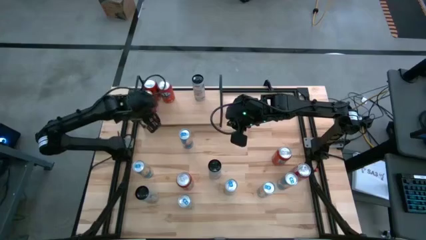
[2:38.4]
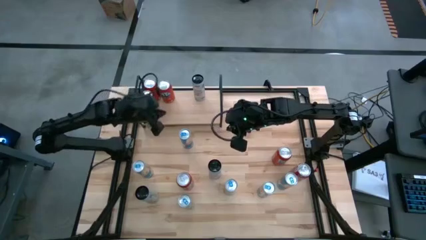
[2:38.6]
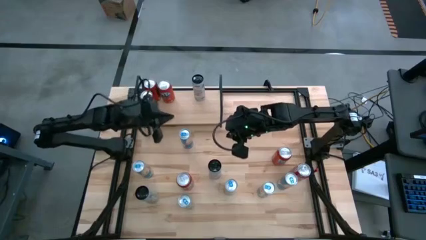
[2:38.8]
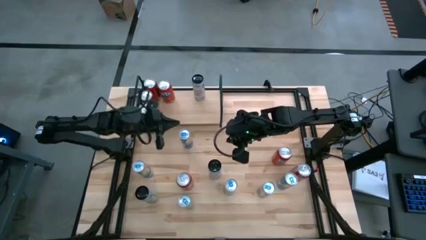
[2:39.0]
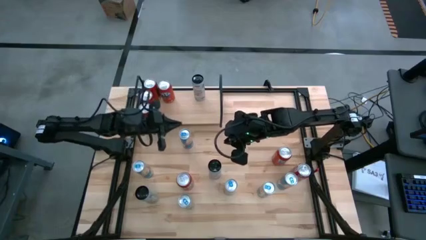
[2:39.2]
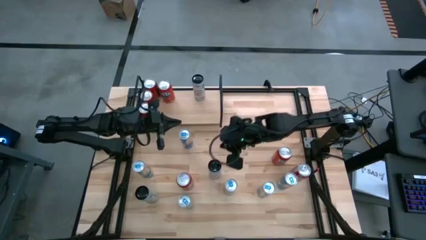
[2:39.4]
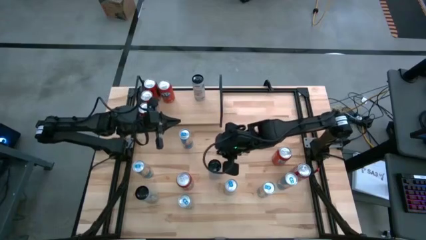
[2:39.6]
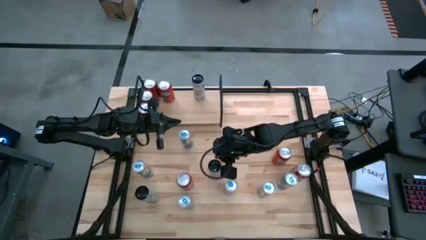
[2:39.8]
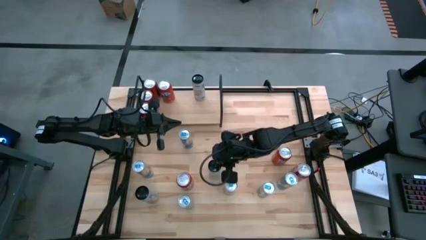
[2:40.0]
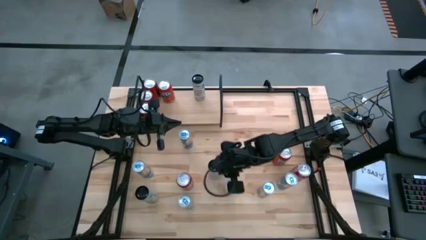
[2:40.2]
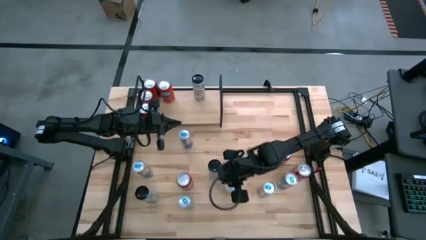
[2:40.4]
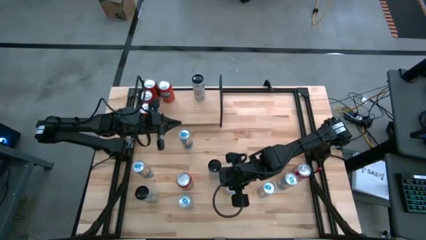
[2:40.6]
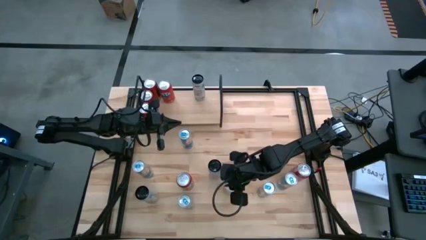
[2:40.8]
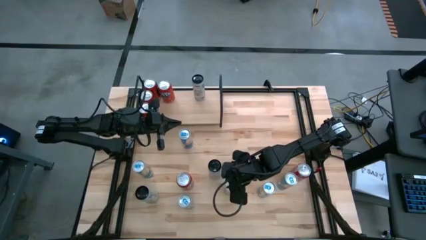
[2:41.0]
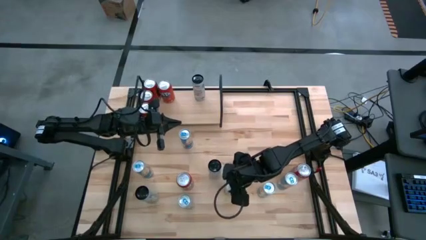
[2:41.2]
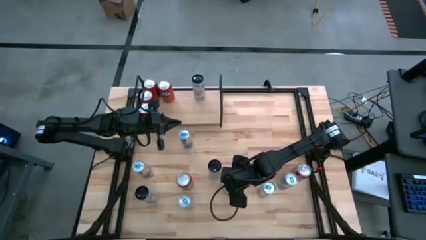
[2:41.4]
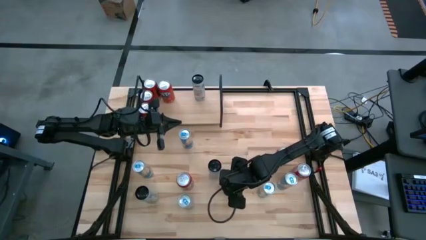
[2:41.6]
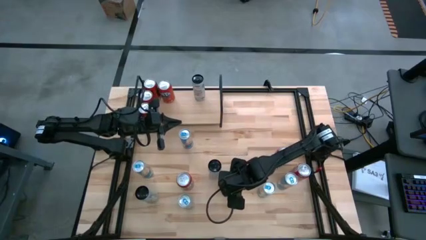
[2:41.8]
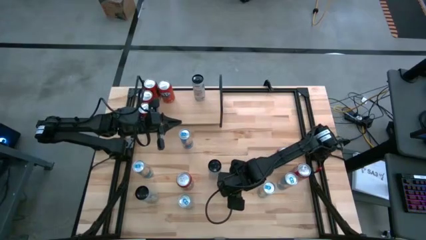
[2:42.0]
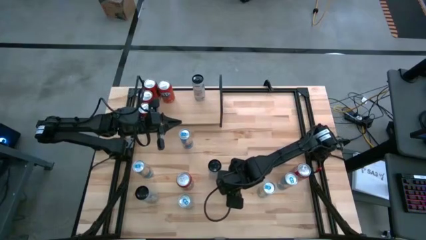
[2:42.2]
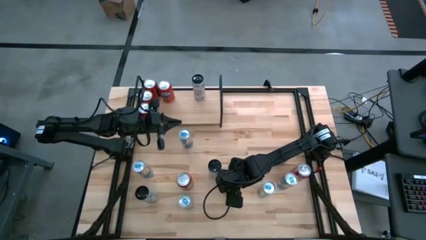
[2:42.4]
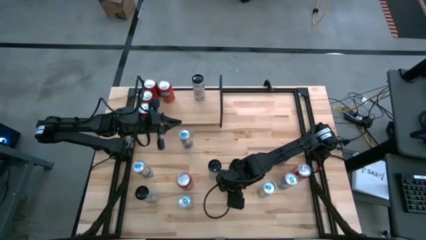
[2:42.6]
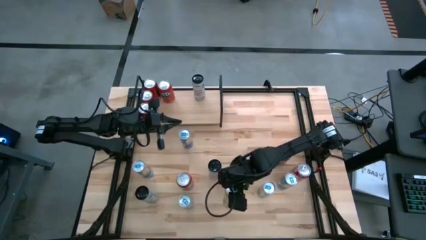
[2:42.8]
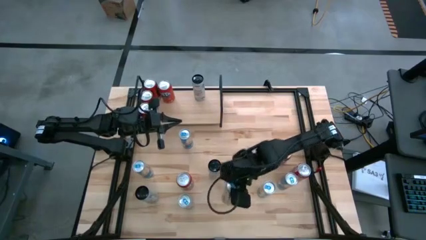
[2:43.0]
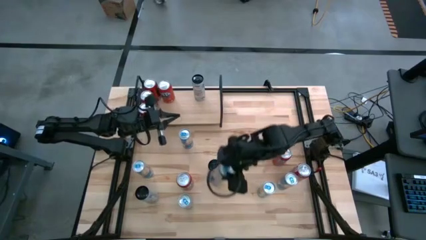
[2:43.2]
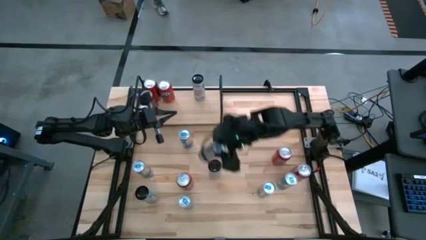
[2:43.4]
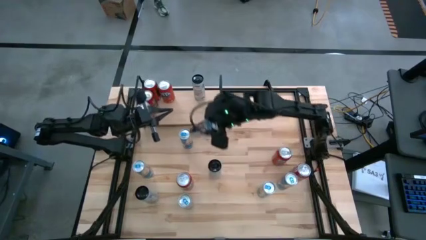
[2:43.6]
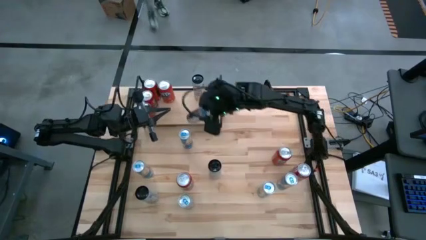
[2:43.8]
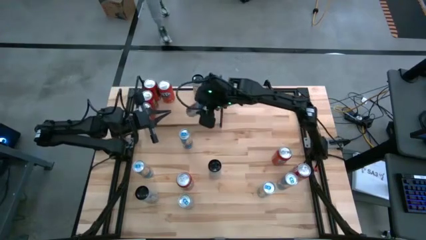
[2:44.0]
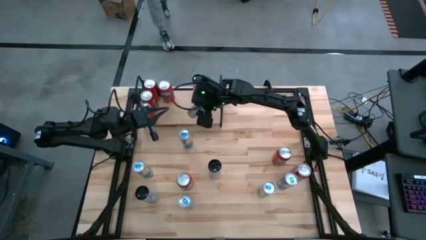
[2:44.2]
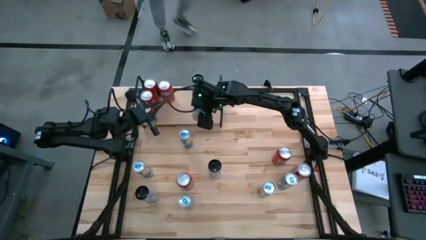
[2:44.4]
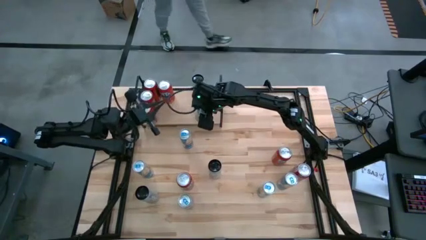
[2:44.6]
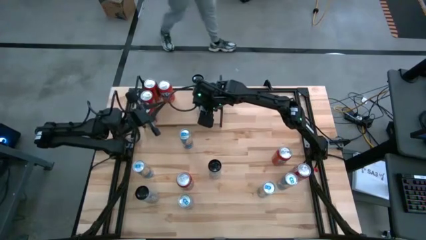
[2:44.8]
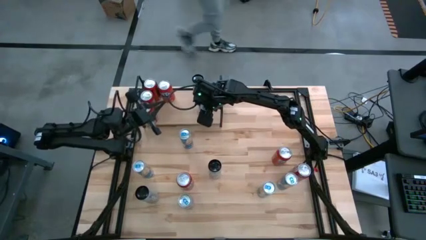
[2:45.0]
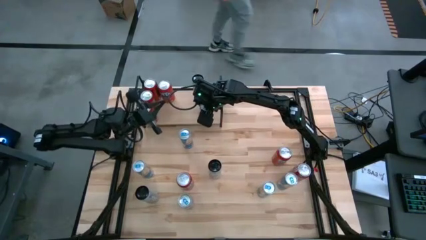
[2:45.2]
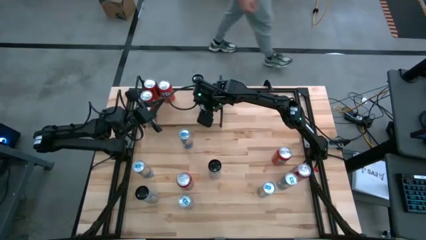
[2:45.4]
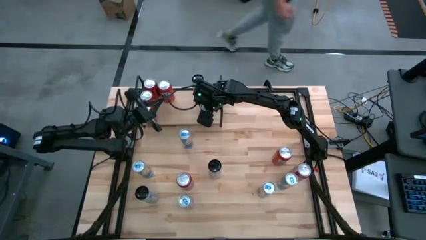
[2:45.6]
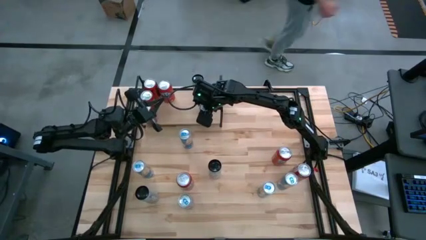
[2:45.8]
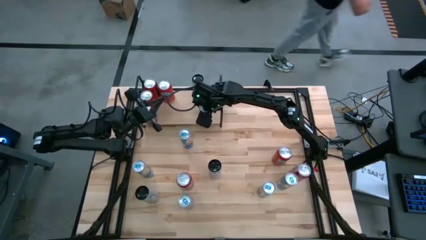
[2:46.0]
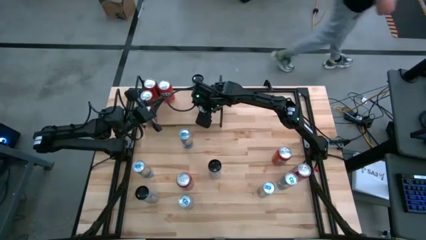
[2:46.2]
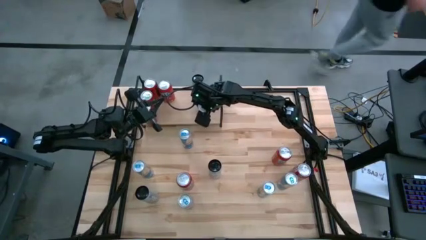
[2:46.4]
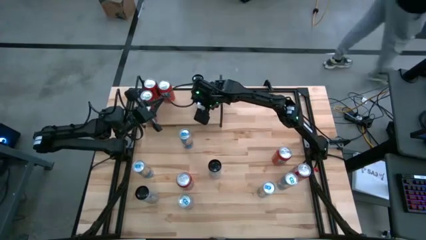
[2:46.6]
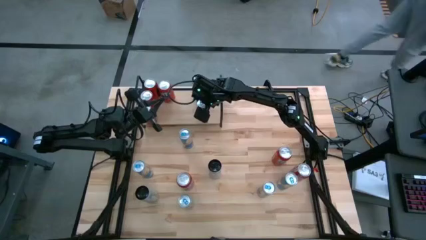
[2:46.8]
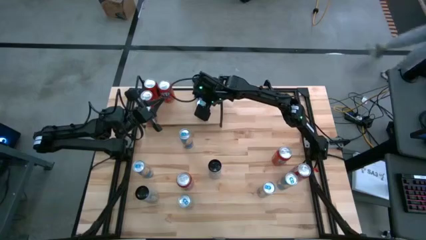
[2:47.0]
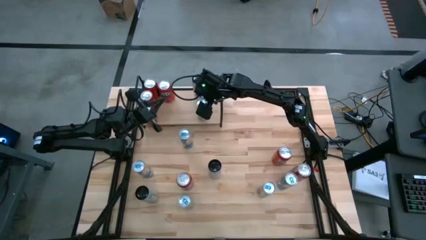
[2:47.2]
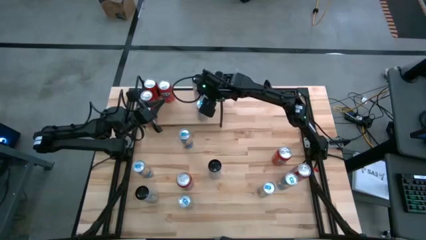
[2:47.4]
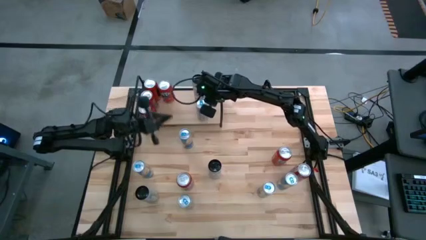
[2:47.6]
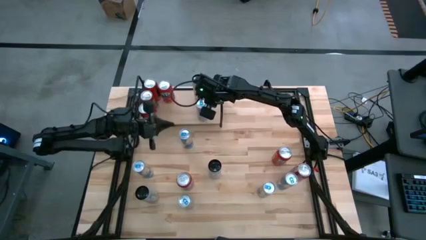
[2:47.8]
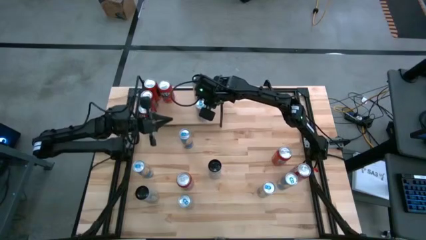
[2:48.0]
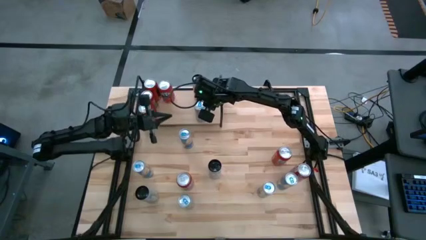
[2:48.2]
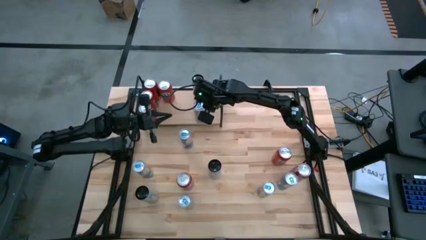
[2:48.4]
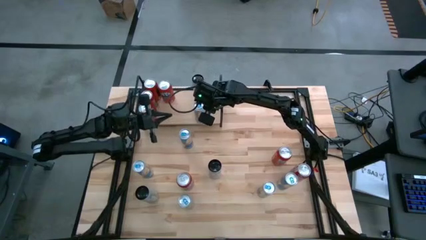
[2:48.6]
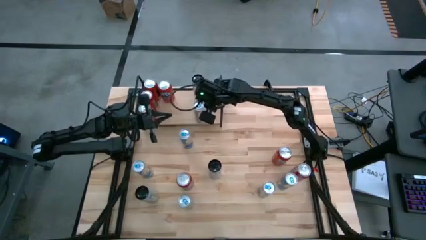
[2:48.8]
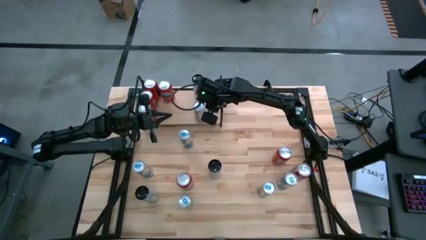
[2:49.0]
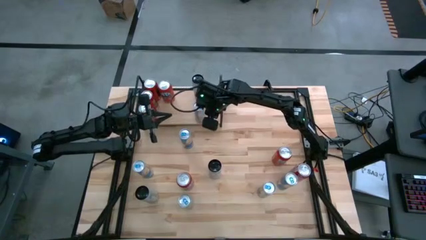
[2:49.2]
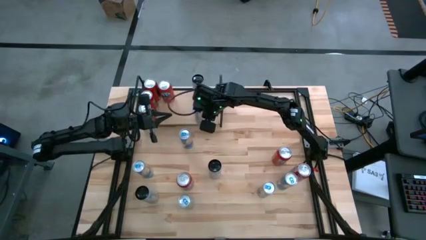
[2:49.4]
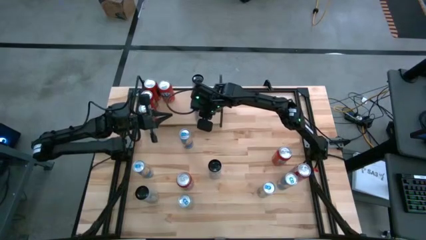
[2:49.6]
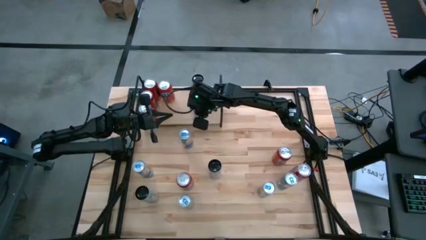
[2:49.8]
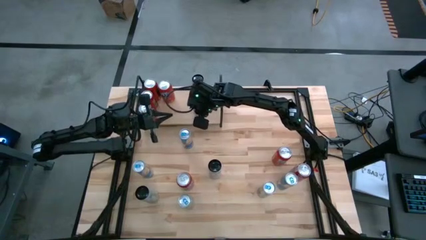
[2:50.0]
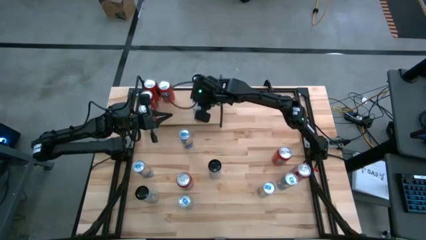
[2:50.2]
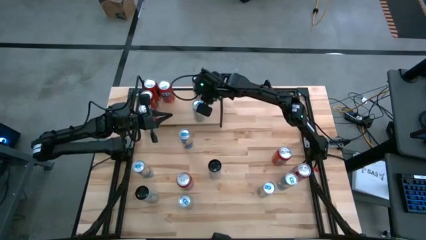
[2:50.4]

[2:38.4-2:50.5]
Task: Place canned beverage on shelf
Put the blue soda can on the shelf
